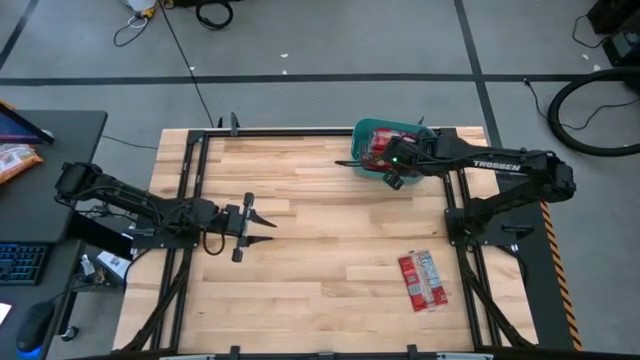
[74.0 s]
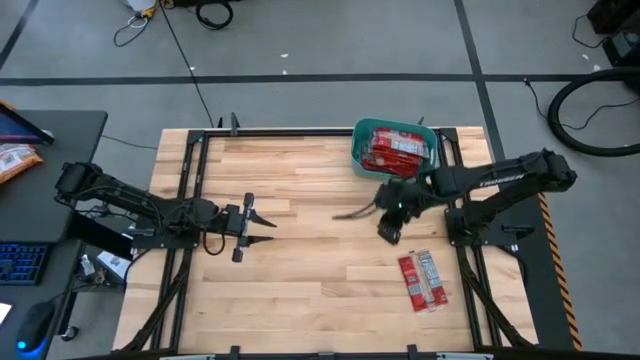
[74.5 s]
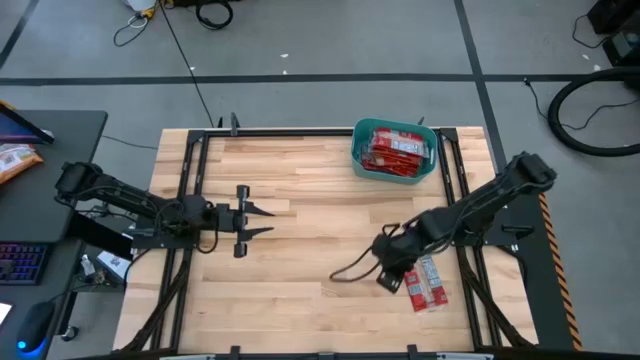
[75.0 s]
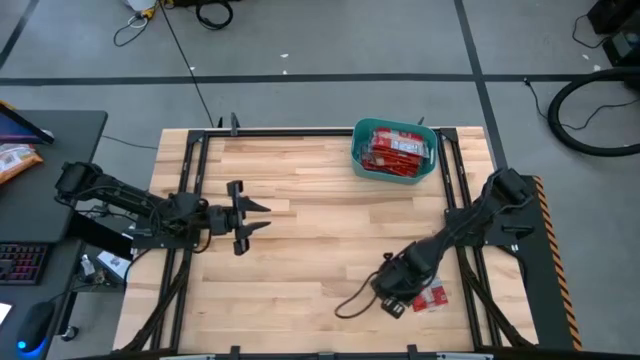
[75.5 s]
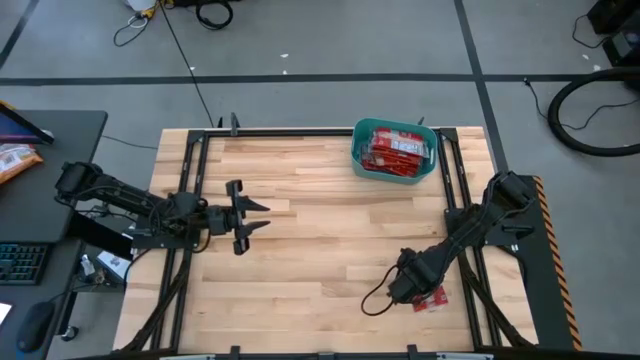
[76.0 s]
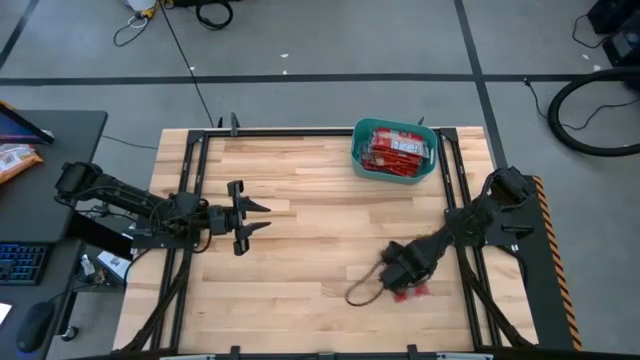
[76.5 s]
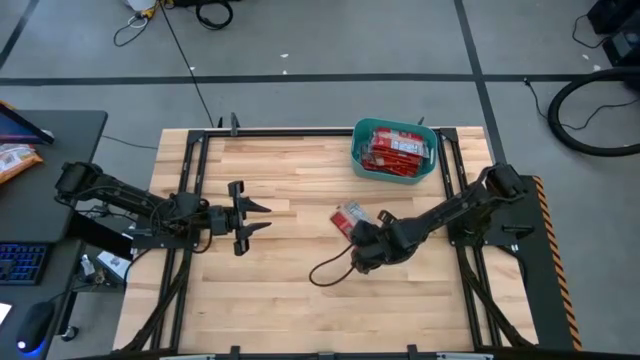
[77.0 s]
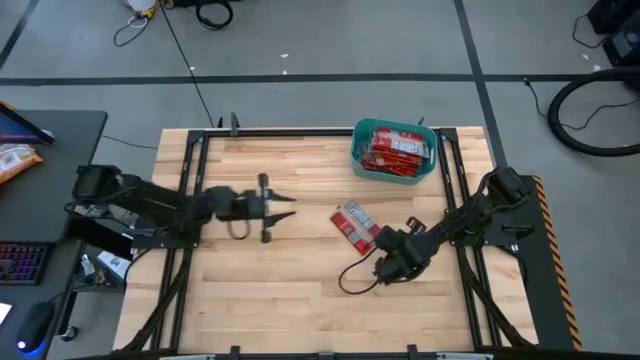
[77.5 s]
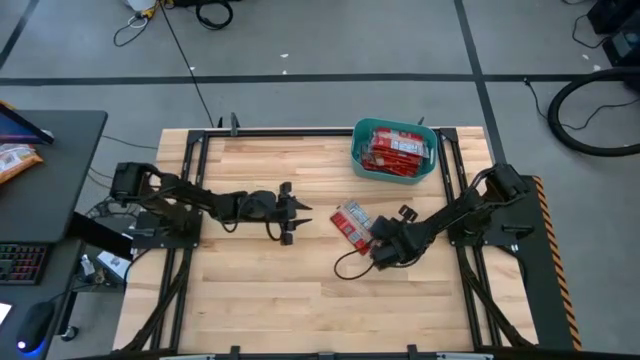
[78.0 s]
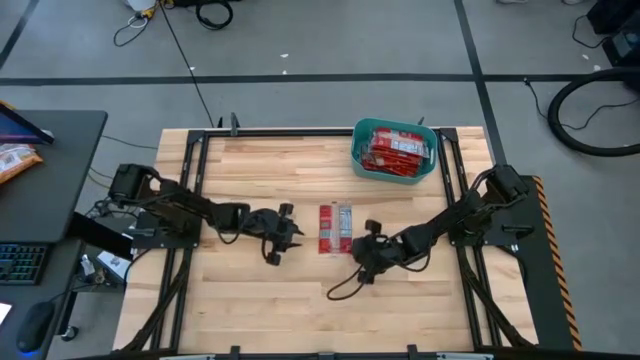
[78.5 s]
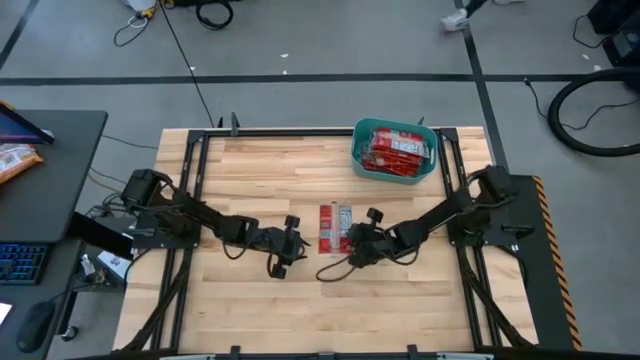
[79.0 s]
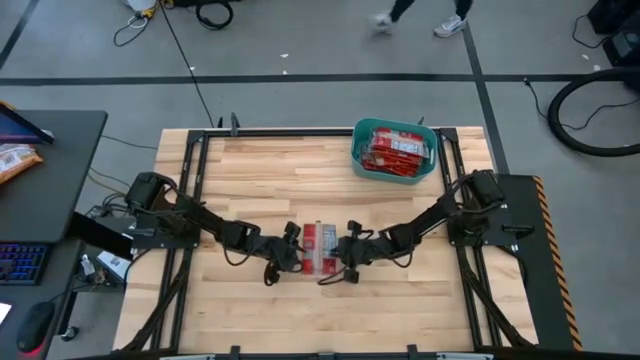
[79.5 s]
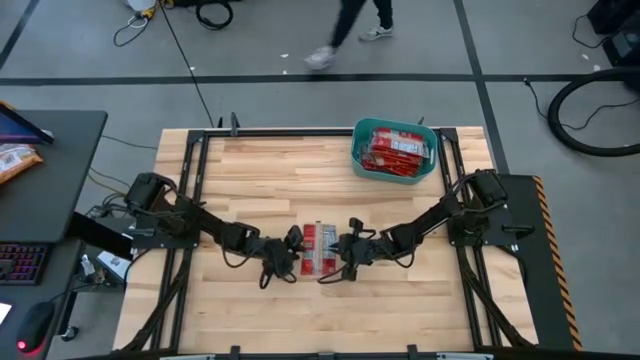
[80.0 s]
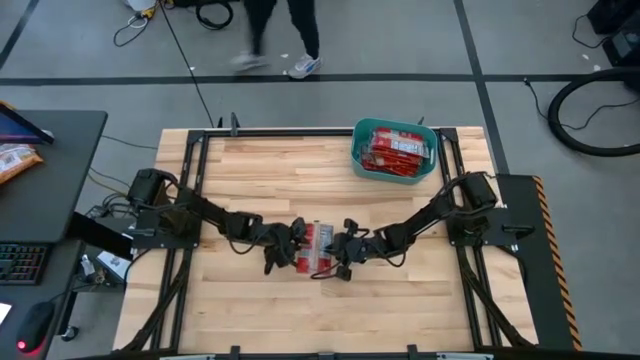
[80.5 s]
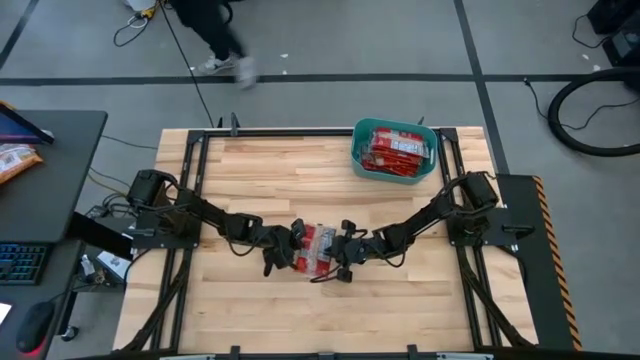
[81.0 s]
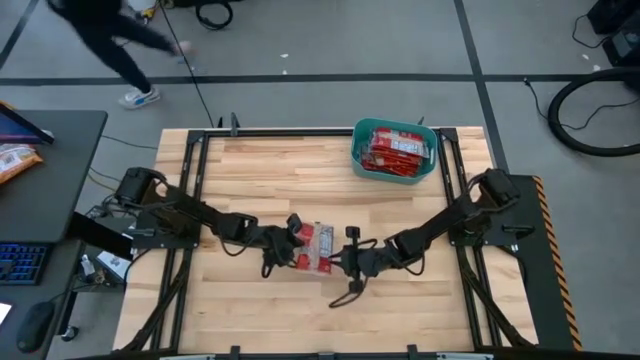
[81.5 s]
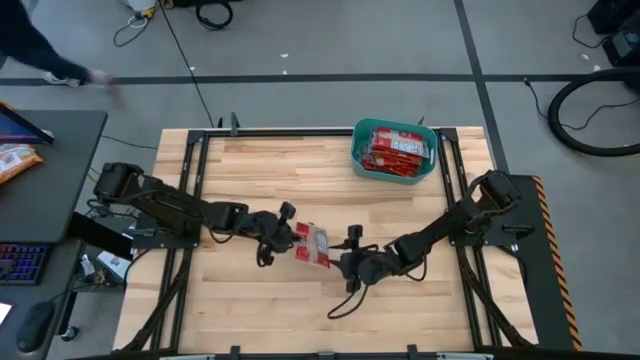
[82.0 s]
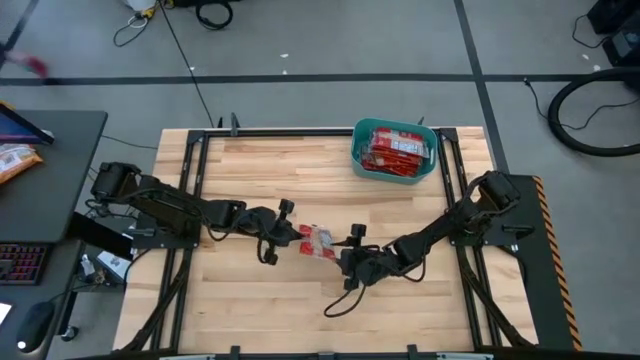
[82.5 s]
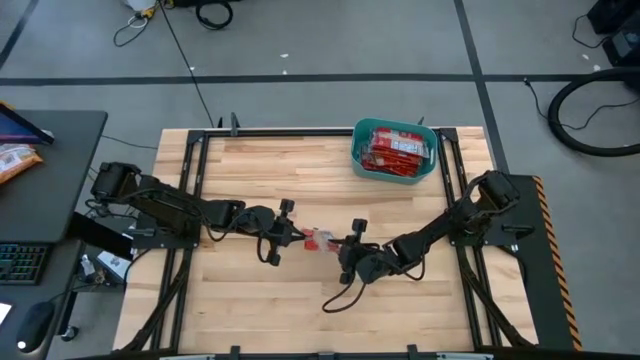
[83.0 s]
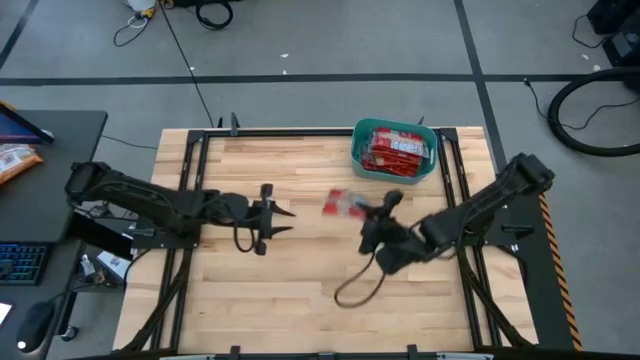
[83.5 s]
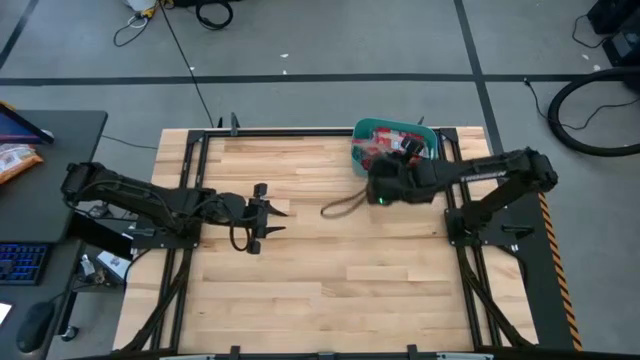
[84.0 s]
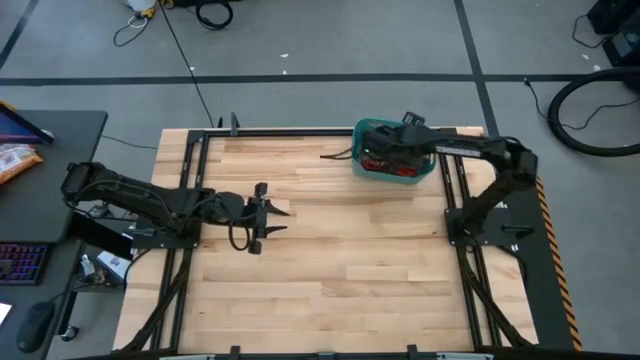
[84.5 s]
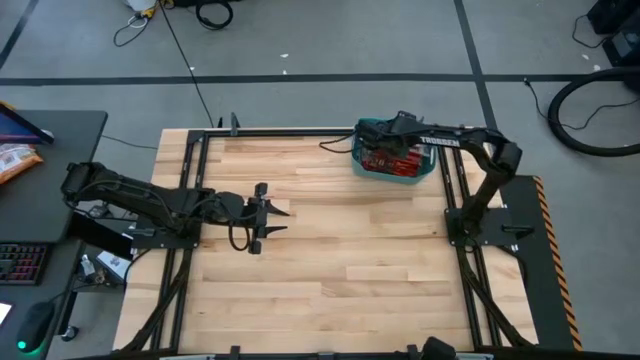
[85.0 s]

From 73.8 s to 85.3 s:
Task: Sort popcorn bags into baskets
Put the red popcorn bag into the green bin

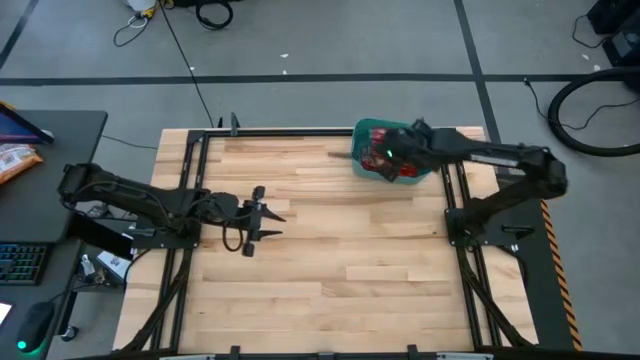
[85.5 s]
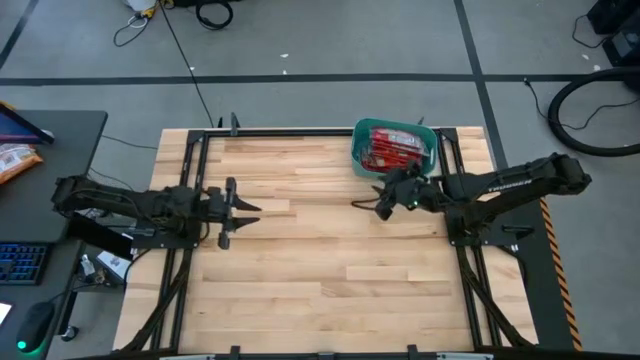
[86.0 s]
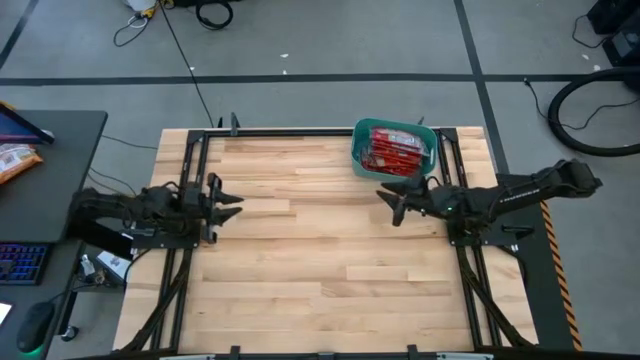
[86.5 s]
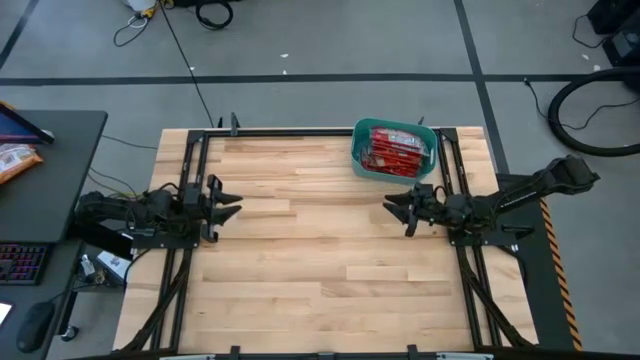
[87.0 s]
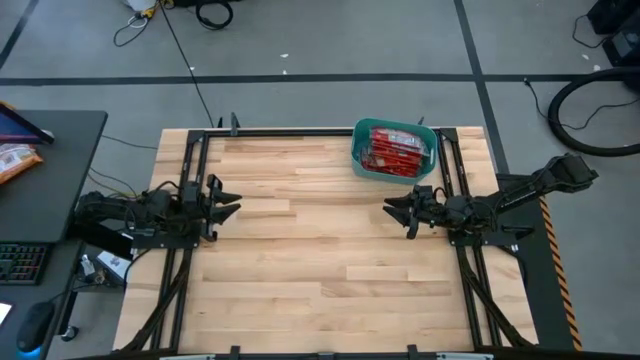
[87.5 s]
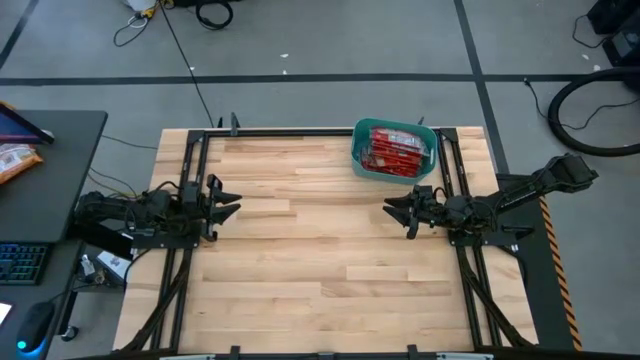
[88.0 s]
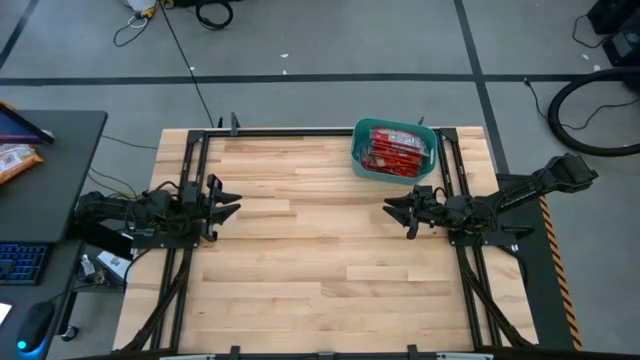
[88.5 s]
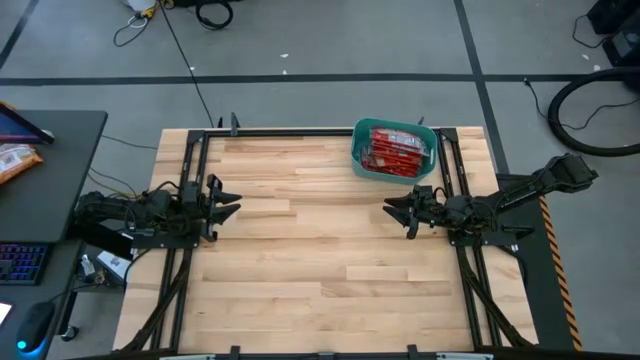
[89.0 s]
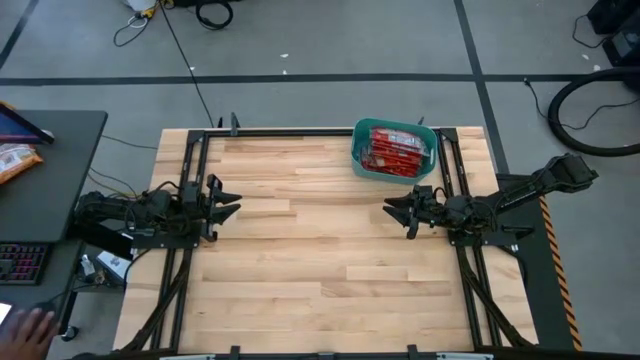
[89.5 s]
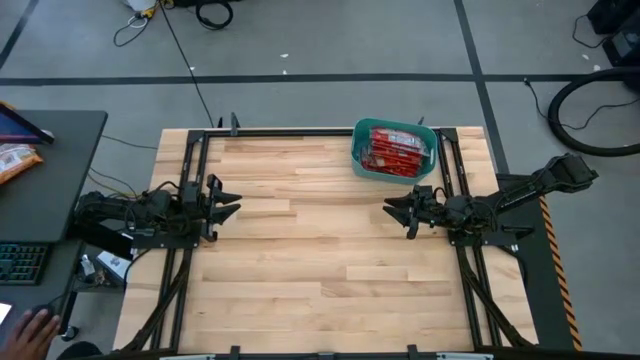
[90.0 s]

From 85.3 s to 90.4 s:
Return to Home Position

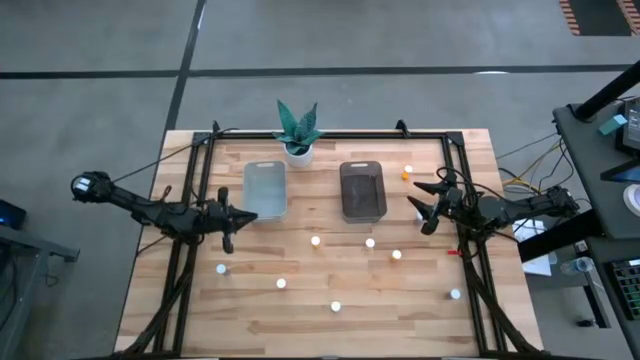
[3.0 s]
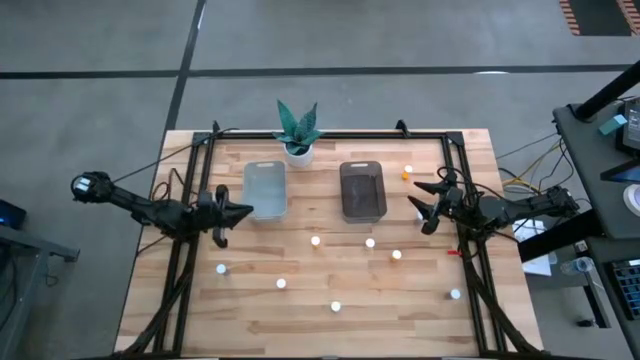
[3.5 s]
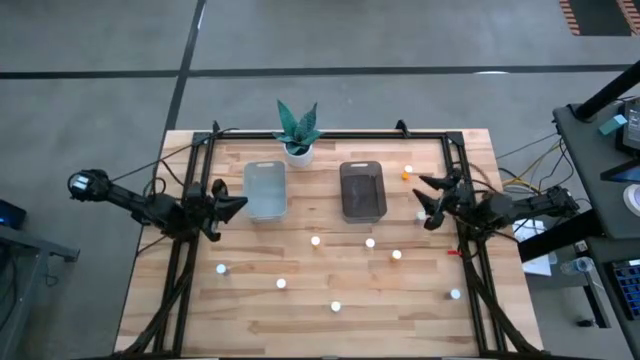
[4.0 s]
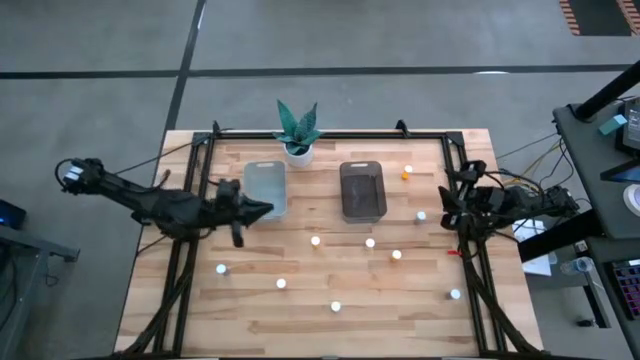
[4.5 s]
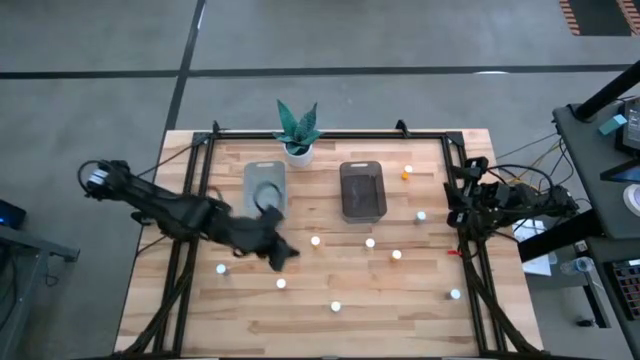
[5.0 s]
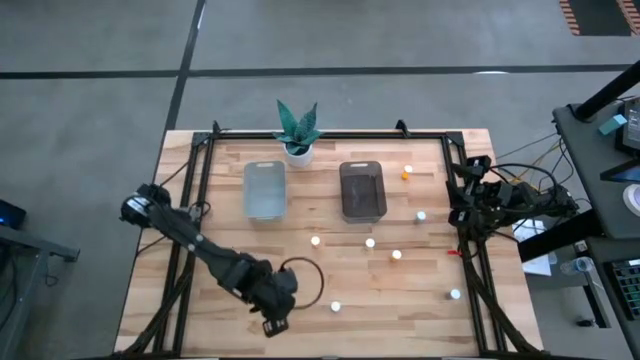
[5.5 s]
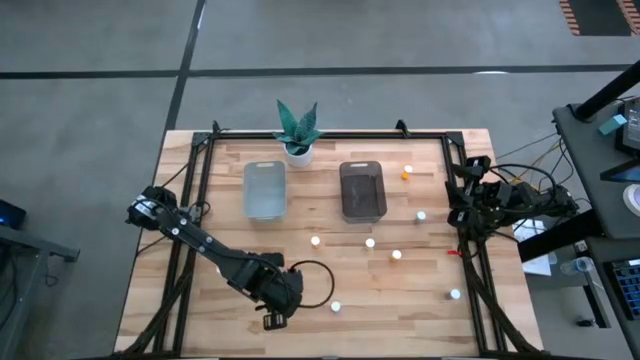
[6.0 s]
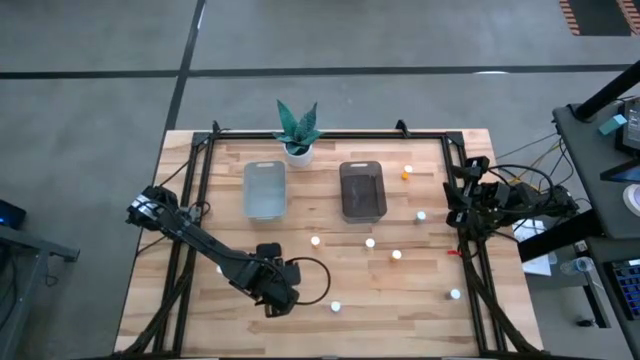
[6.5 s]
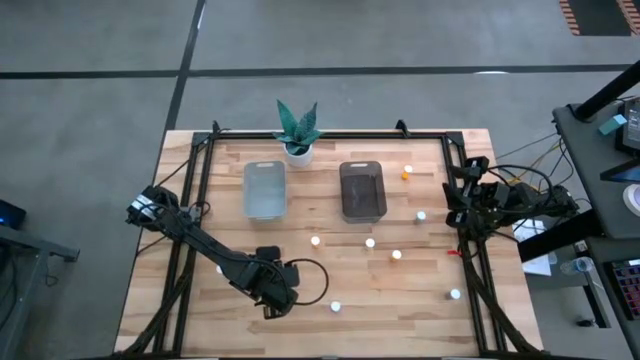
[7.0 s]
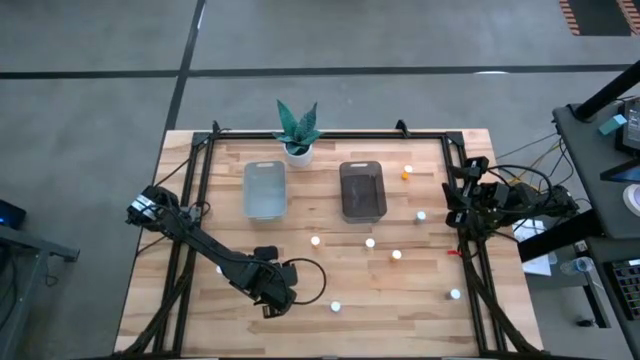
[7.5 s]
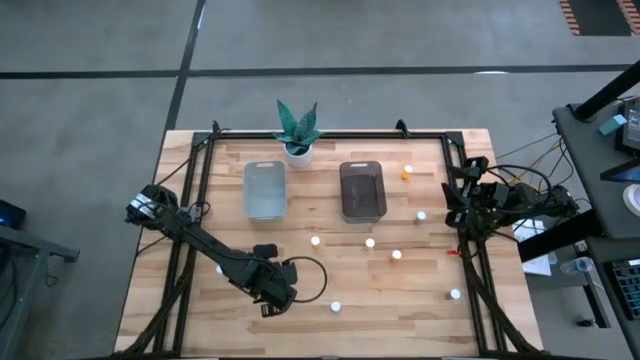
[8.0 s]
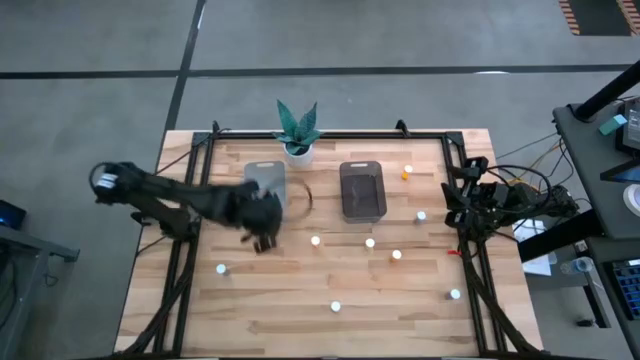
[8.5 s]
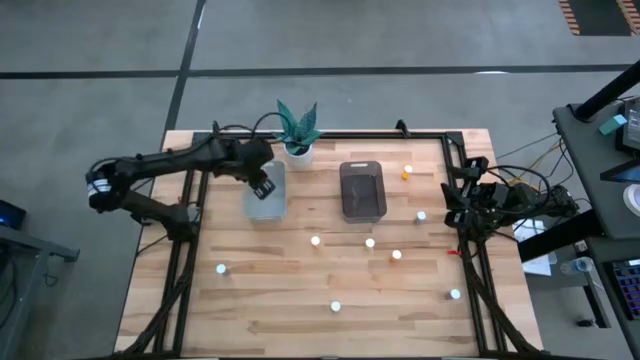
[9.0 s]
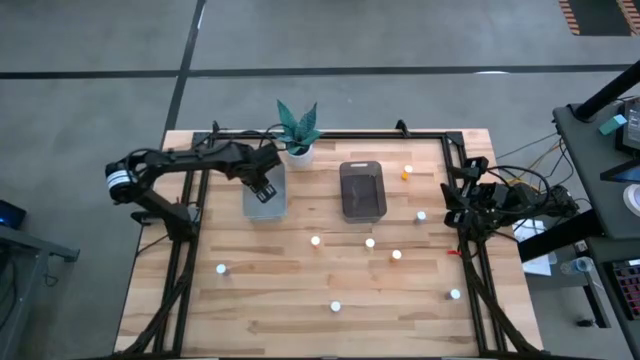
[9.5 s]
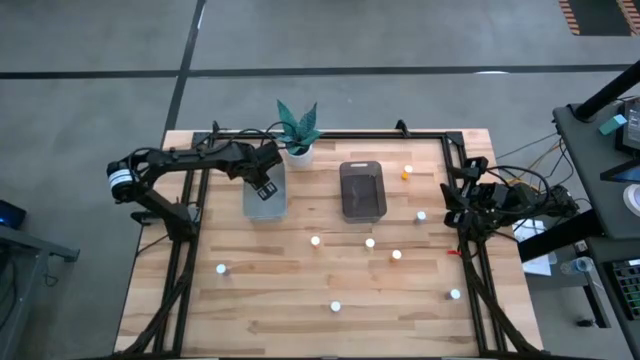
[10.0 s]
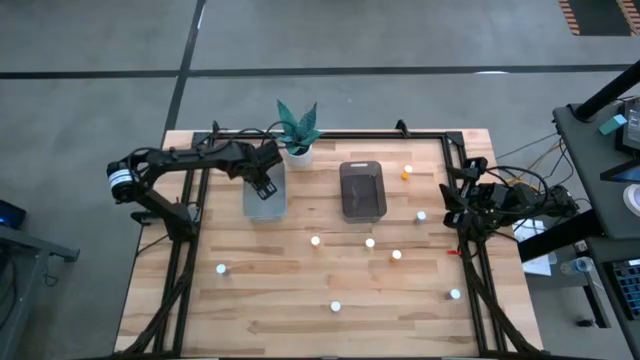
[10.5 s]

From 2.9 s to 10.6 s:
Task: Pick and place medicine bottles into bin by pill shape (circle, oval)
Put the left pink tablet bottle into the gray bin
